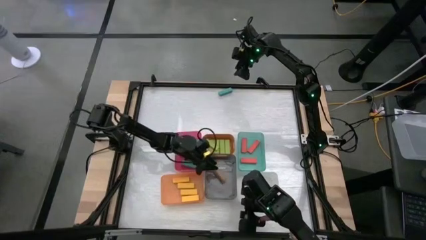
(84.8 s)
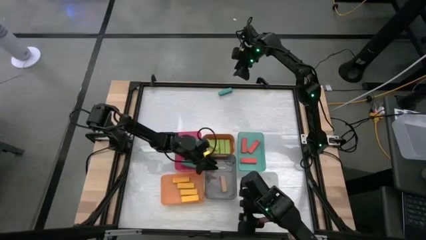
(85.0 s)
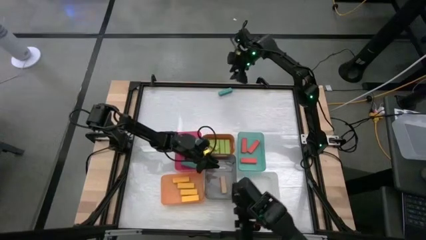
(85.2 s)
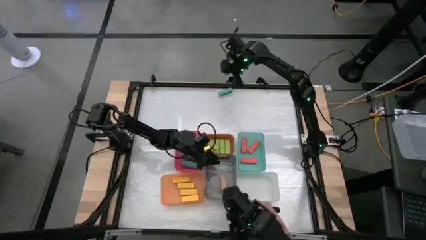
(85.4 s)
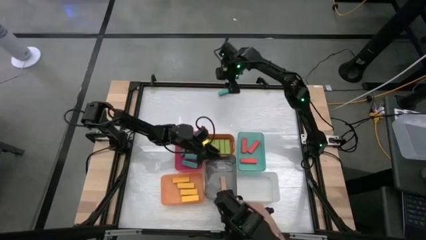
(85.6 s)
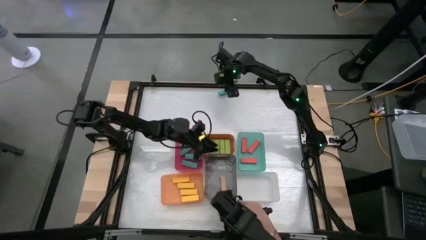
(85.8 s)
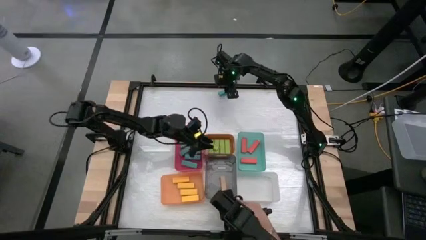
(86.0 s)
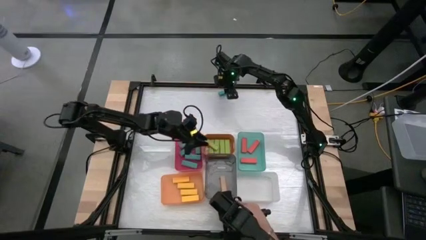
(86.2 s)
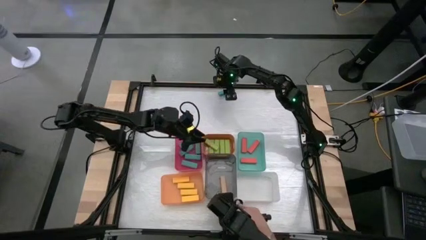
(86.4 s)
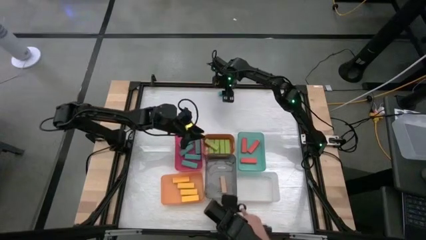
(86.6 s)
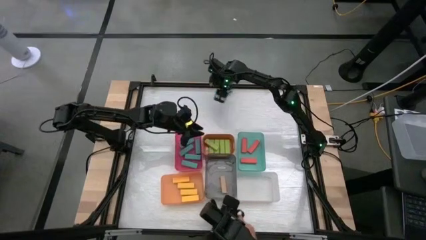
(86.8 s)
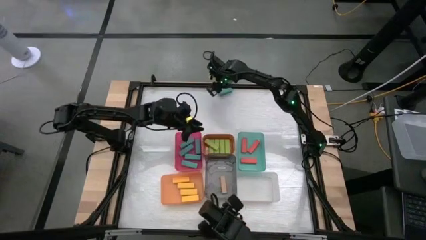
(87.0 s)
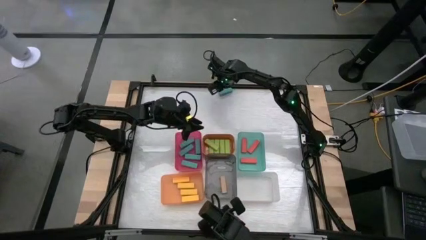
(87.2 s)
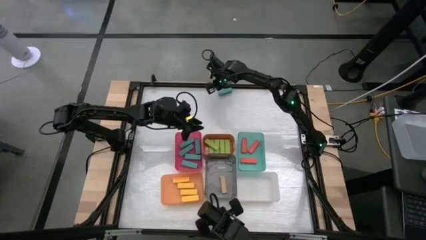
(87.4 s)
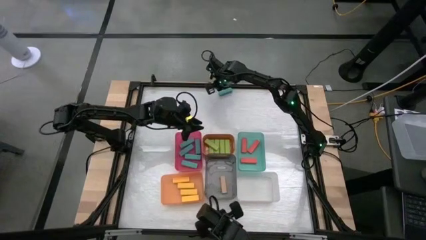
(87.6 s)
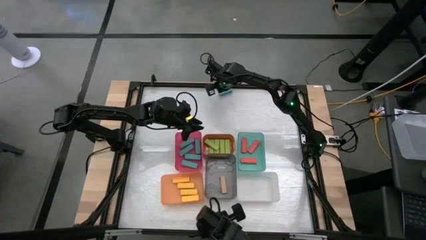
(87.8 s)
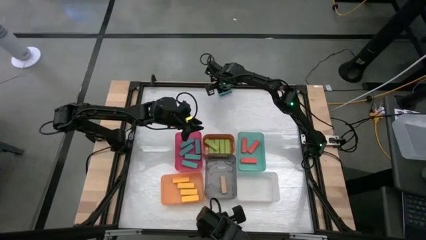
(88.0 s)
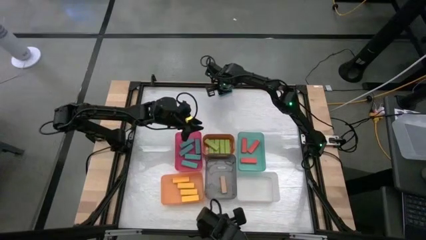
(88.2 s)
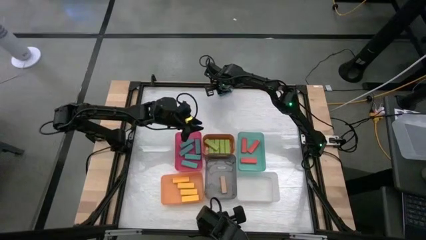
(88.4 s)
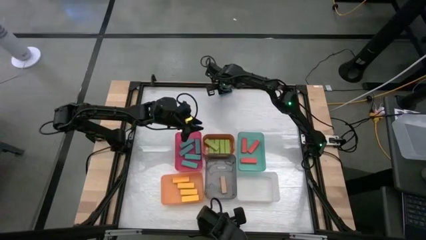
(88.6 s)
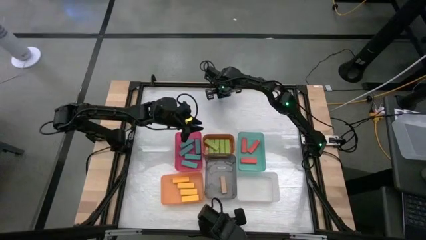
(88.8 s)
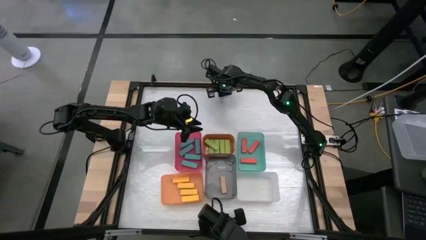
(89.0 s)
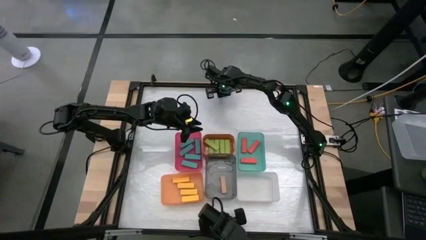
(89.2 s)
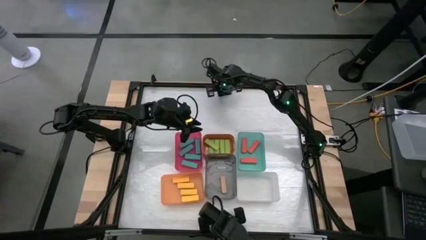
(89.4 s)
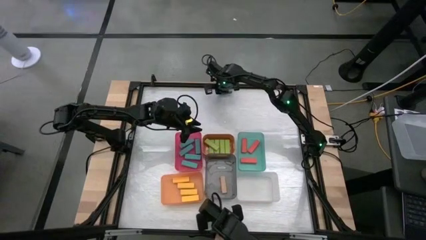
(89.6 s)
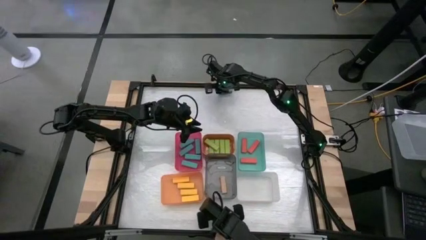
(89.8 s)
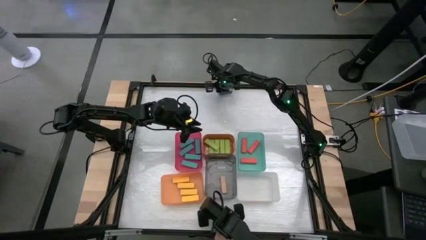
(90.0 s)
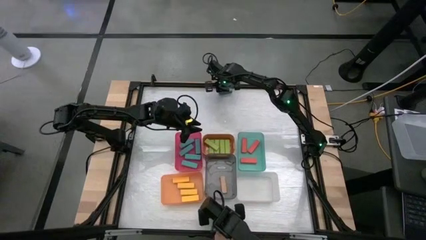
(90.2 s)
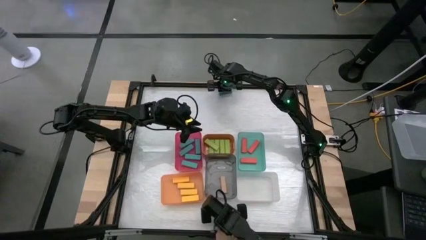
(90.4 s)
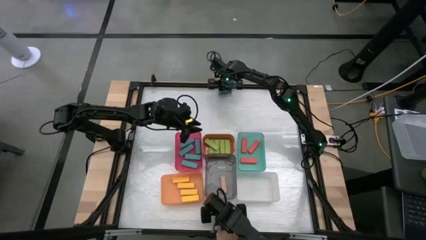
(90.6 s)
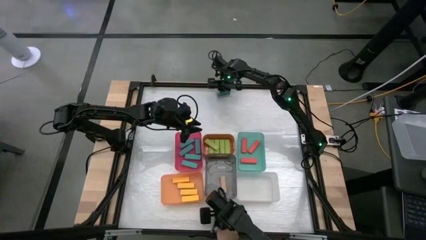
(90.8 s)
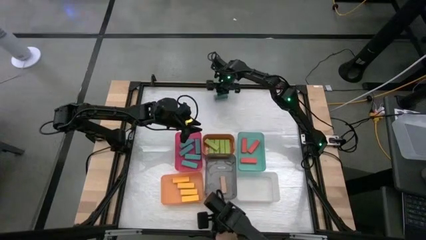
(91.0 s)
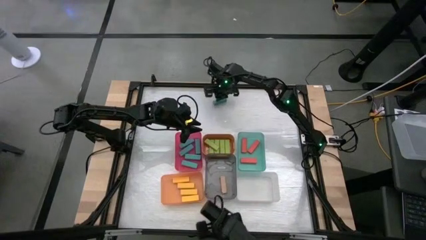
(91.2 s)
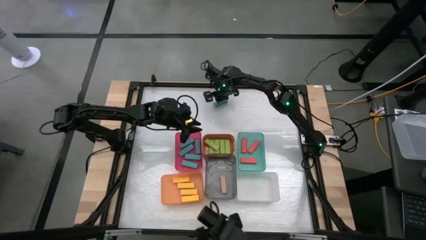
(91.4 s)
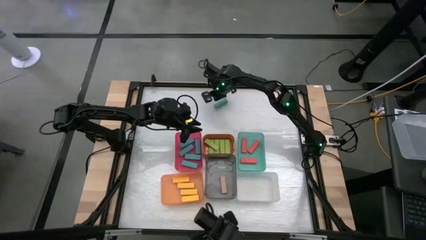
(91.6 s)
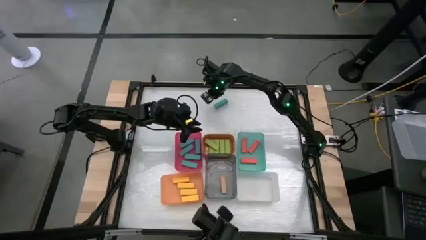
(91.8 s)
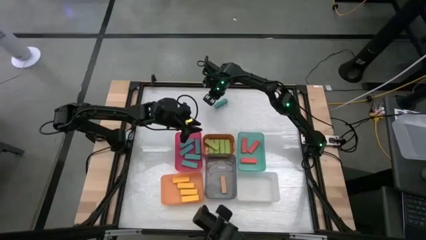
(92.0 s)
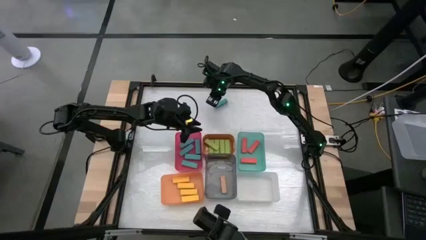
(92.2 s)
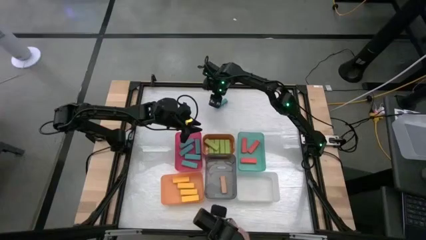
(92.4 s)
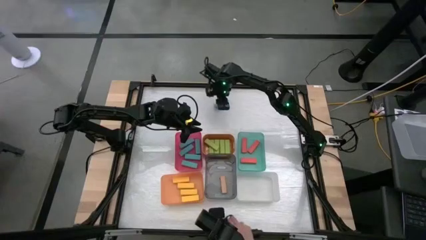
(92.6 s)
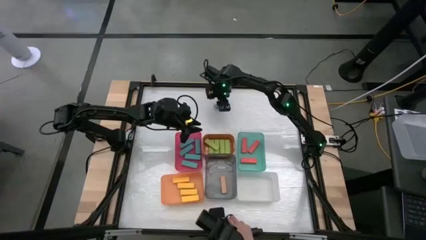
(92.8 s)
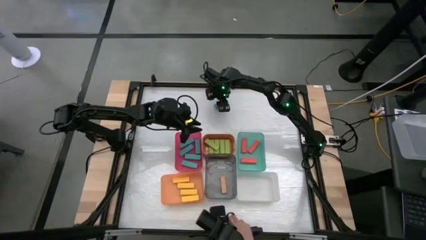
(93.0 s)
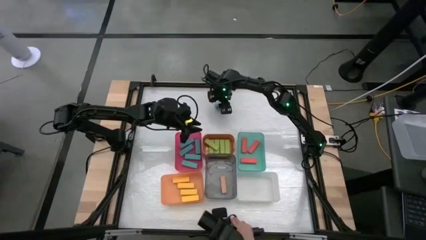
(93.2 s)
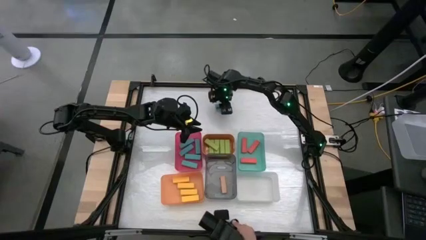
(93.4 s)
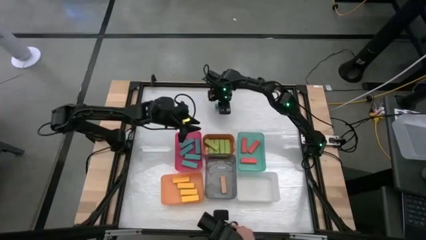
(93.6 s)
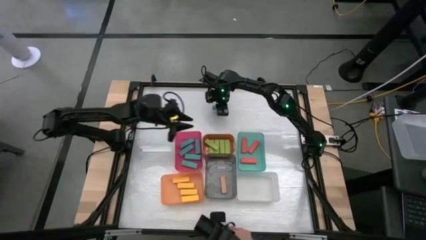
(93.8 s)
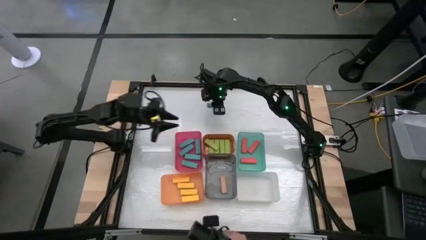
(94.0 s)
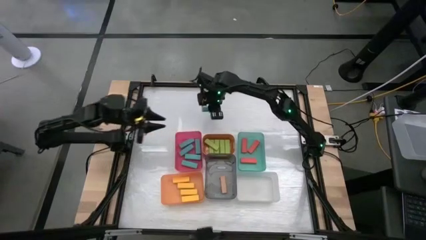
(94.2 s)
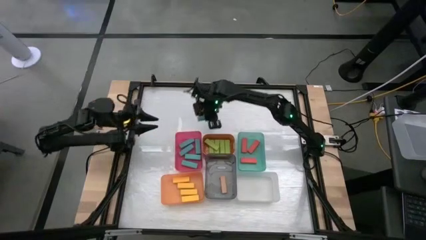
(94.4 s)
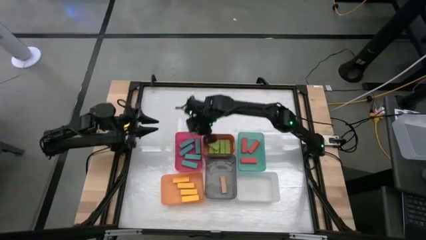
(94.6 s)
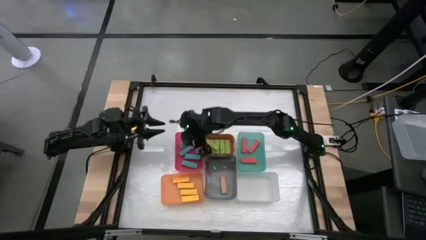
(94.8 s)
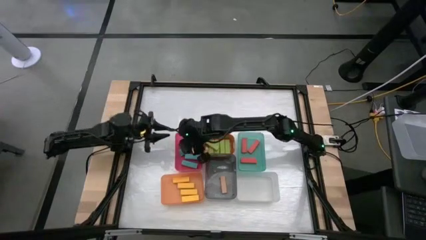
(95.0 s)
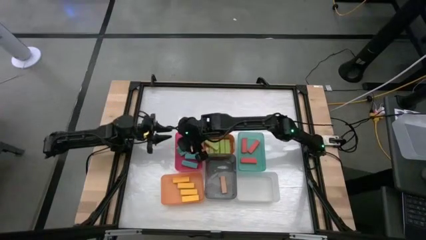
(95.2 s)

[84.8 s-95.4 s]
Task: Sort blocks
Put the blue block into the pink bin

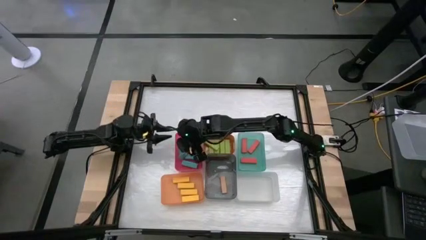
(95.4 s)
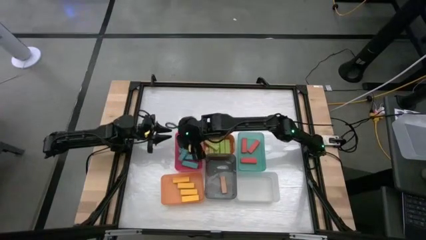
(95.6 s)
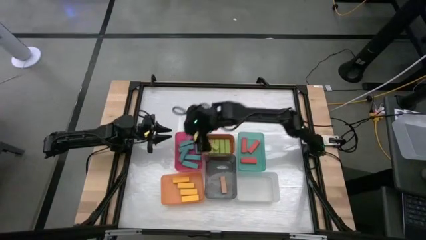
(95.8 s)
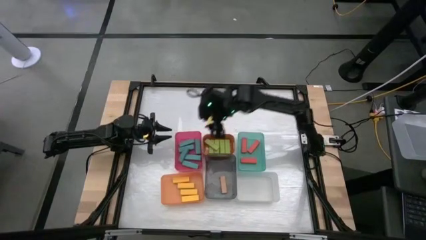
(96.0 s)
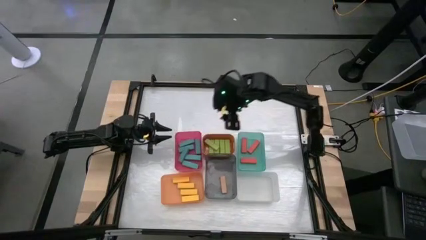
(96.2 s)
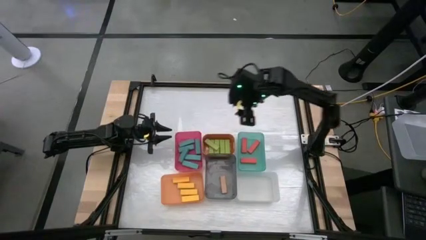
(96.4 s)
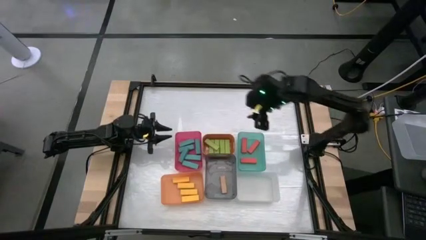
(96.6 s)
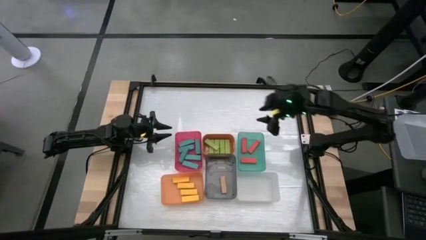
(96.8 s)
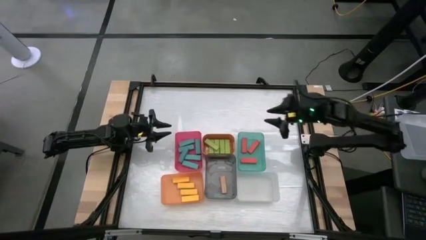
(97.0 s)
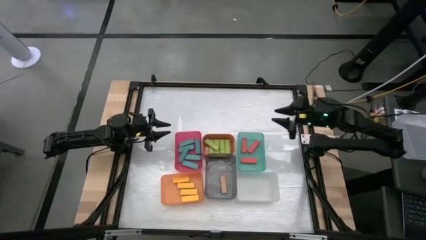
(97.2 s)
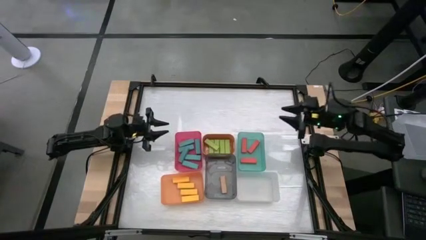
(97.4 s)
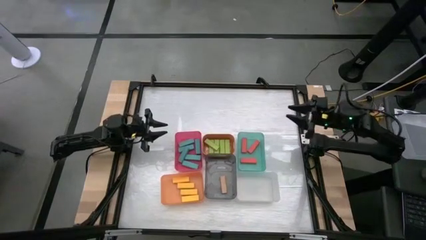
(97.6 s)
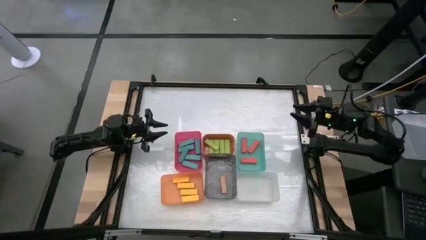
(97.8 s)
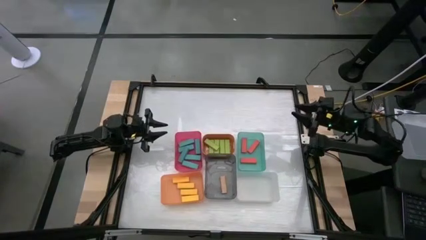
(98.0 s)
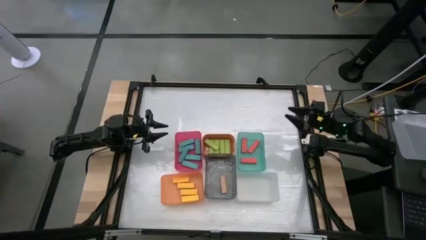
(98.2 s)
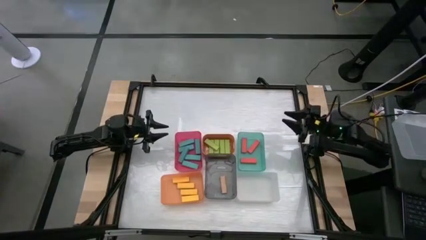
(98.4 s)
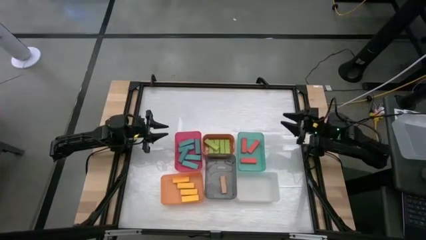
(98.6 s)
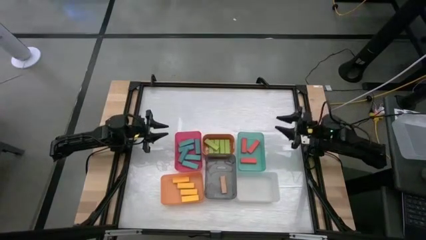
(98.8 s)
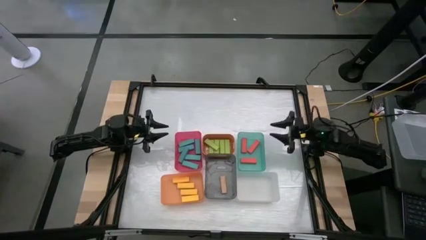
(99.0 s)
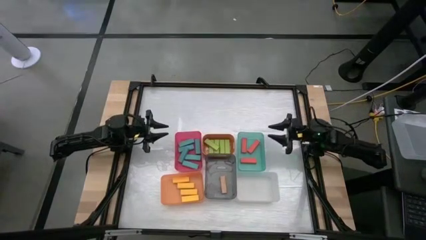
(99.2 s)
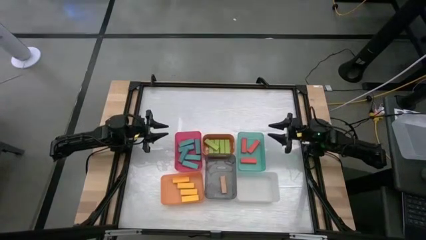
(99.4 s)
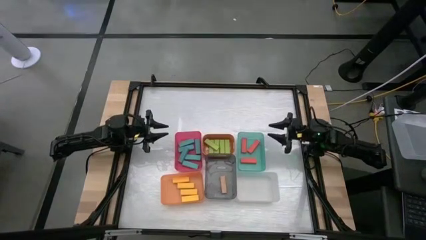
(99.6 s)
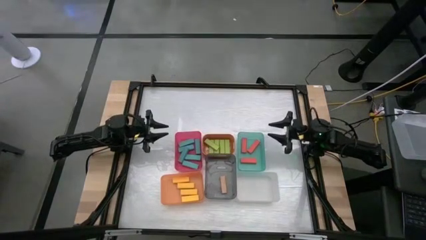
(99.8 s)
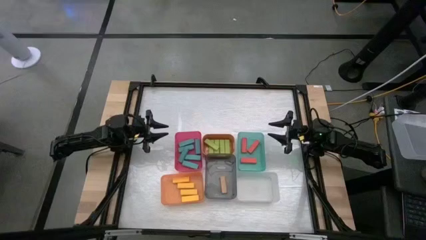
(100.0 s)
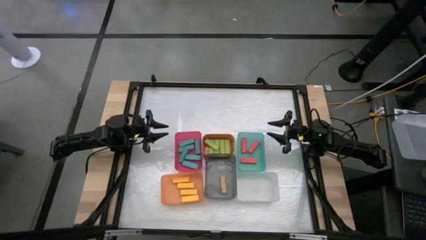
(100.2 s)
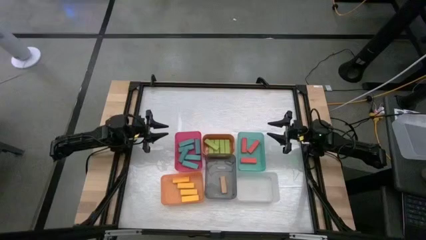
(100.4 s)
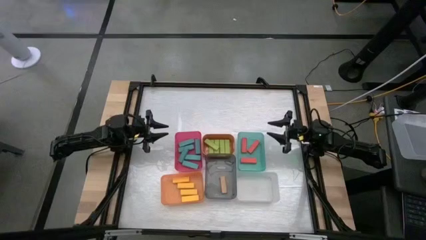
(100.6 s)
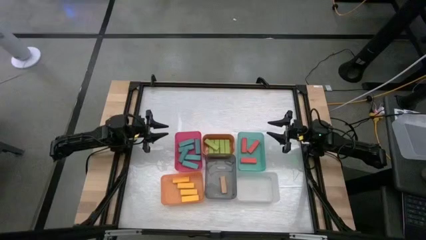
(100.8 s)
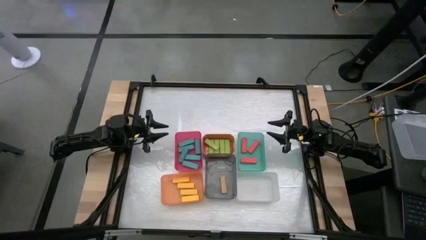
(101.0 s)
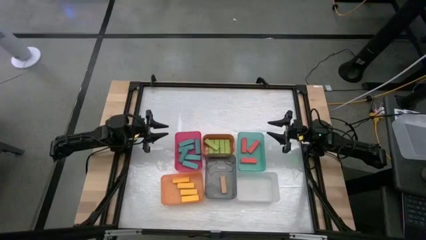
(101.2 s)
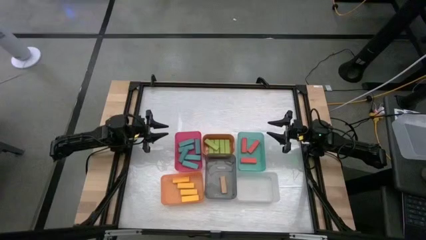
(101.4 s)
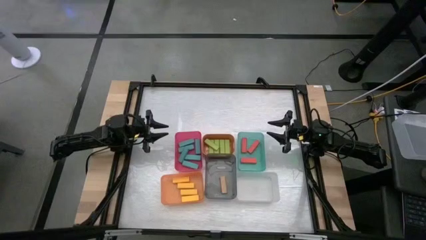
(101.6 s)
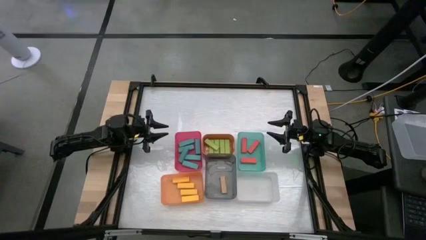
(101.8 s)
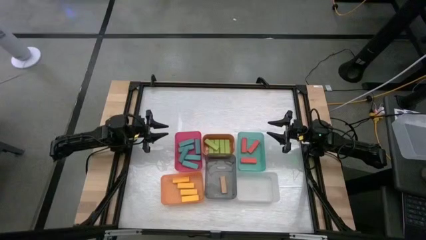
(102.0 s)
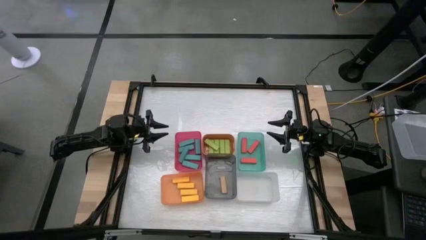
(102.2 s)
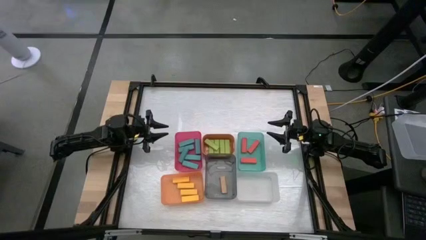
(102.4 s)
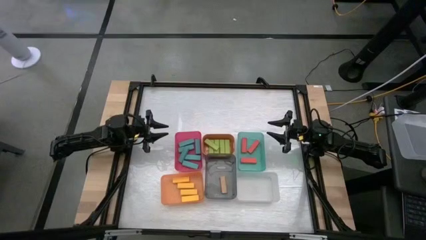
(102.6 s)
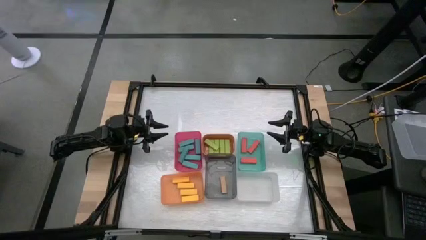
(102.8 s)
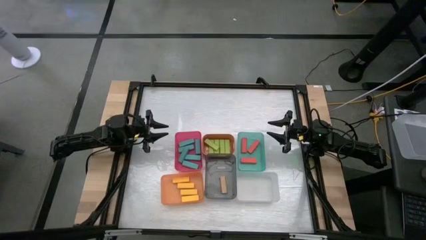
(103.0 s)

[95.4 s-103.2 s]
Return to Home Position
